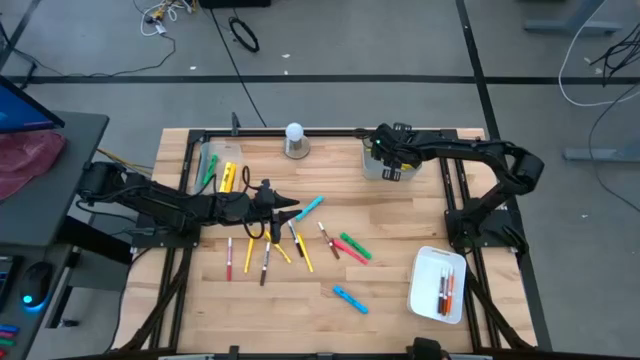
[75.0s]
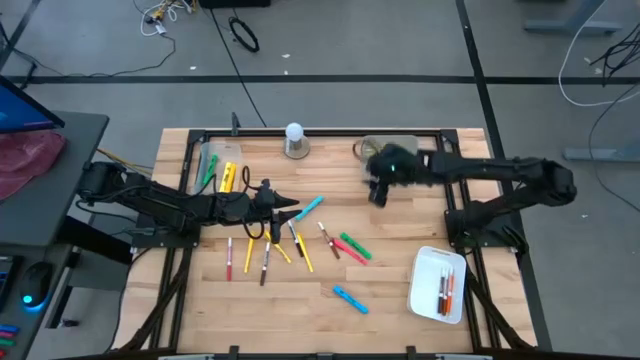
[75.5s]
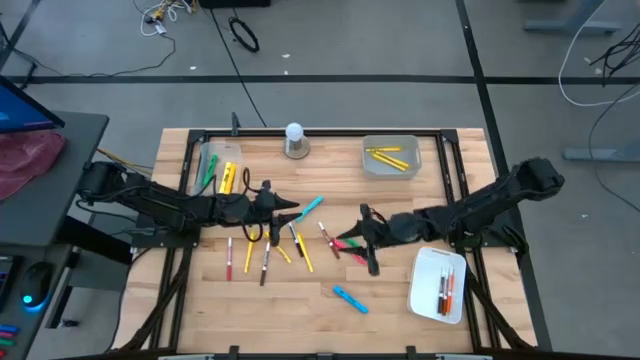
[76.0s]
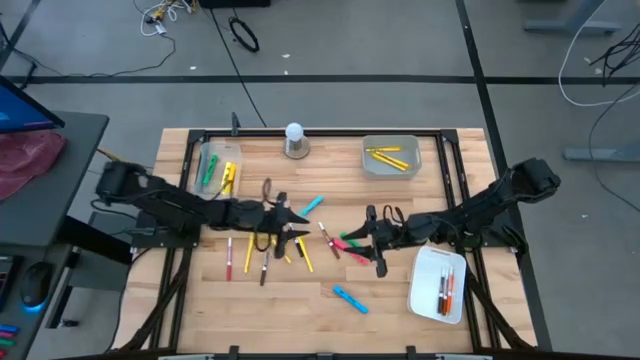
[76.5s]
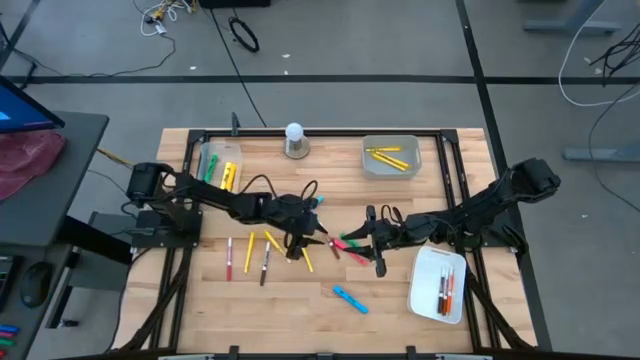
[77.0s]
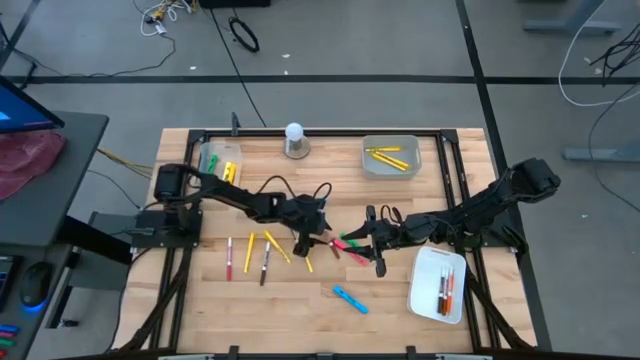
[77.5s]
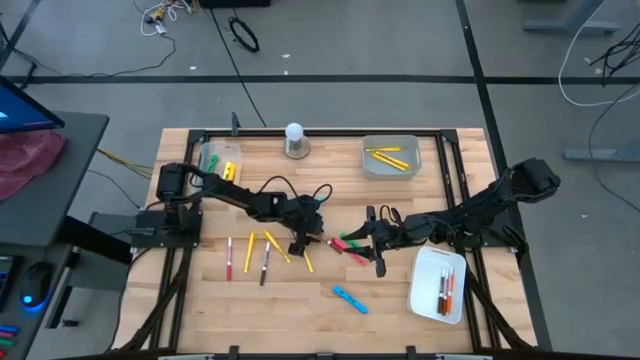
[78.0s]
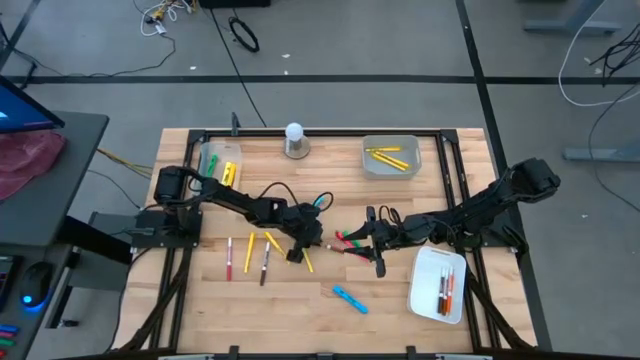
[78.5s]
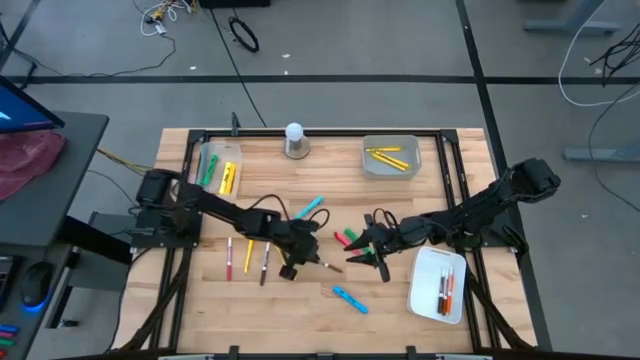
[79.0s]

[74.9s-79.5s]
Task: Pick & Place Markers
Put the brown marker into the white bin

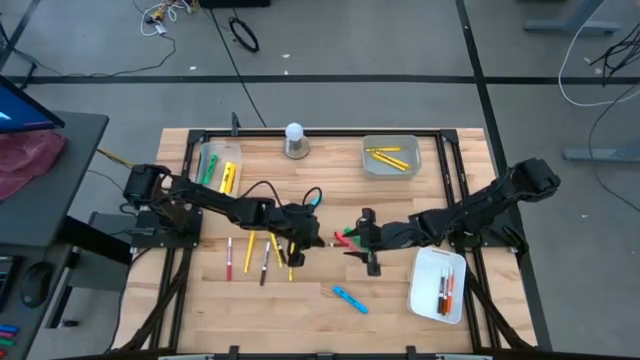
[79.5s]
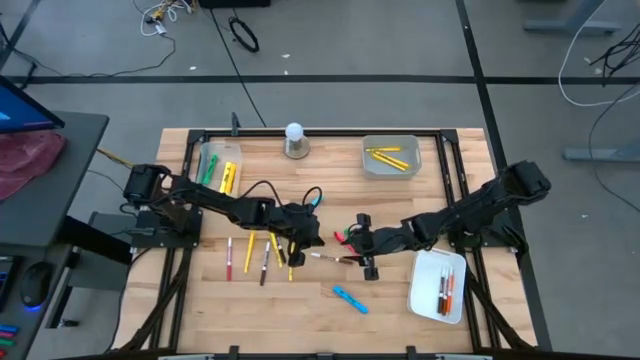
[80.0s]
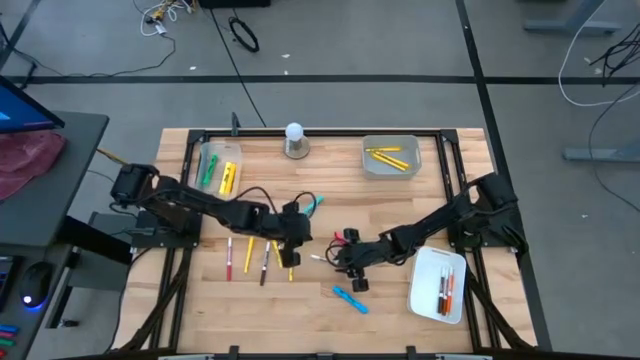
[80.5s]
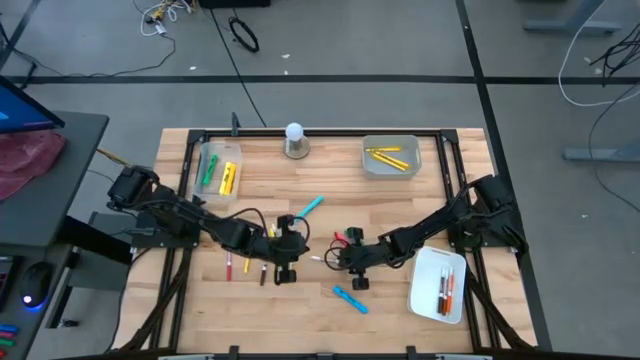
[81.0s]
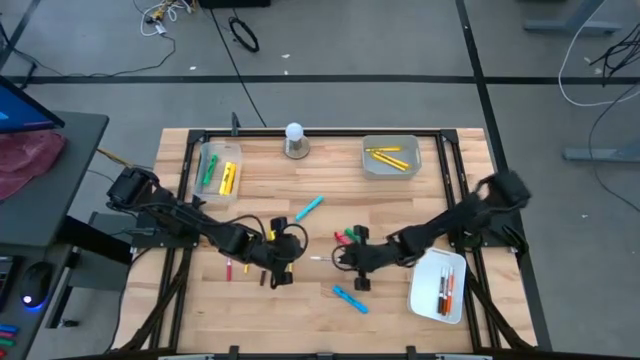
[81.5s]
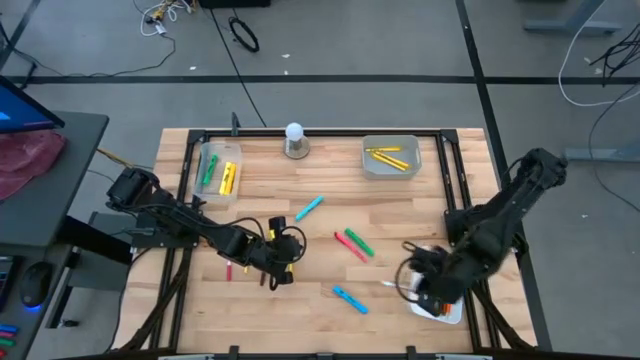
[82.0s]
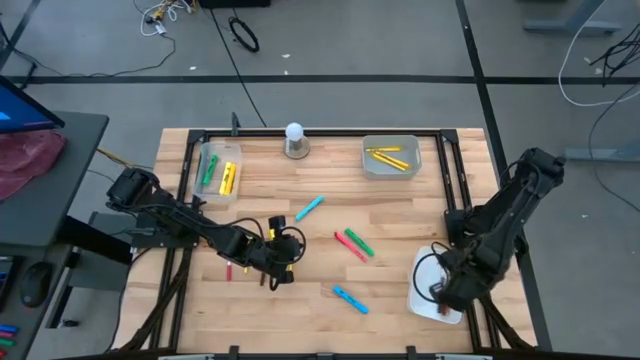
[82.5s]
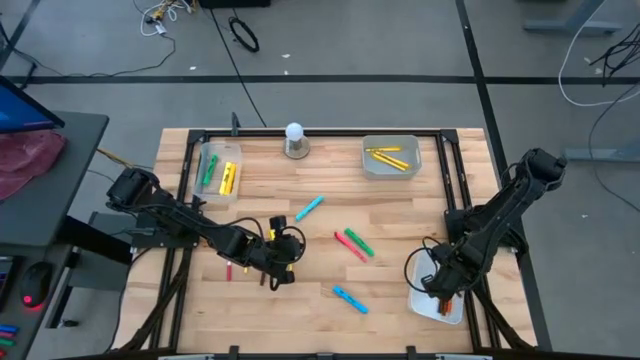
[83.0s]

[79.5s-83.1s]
Put the brown marker into the white bin

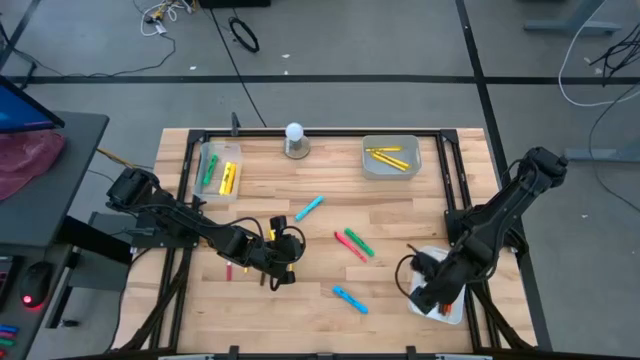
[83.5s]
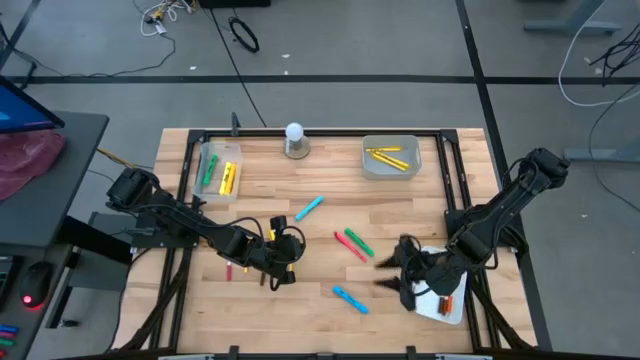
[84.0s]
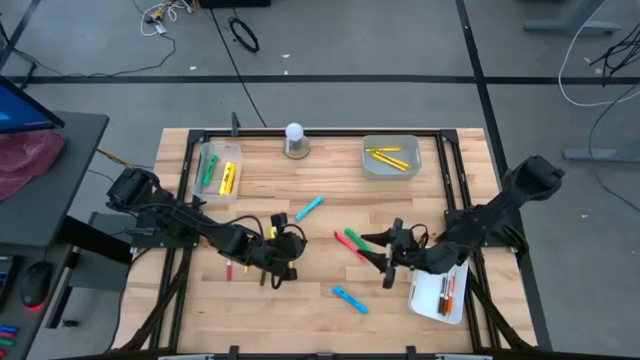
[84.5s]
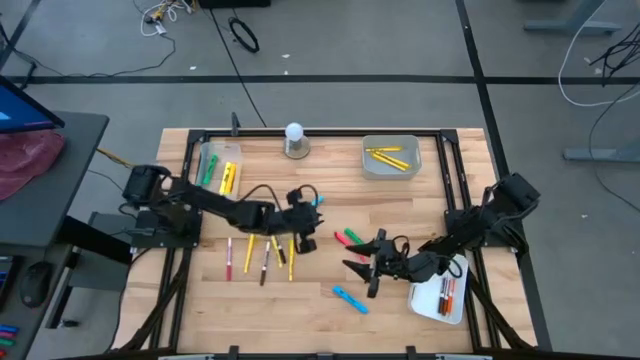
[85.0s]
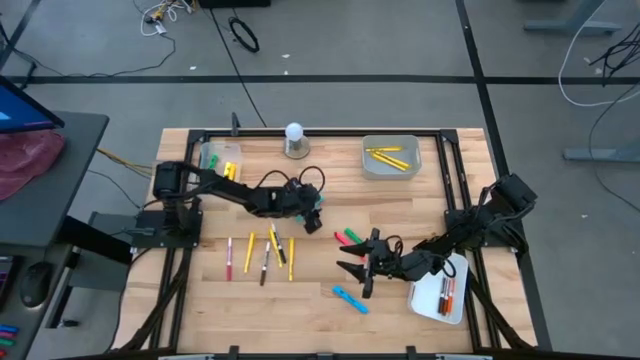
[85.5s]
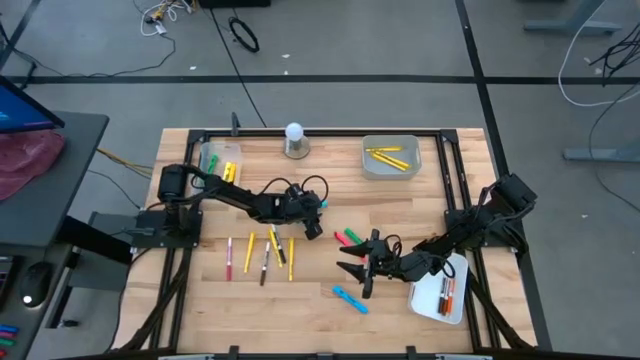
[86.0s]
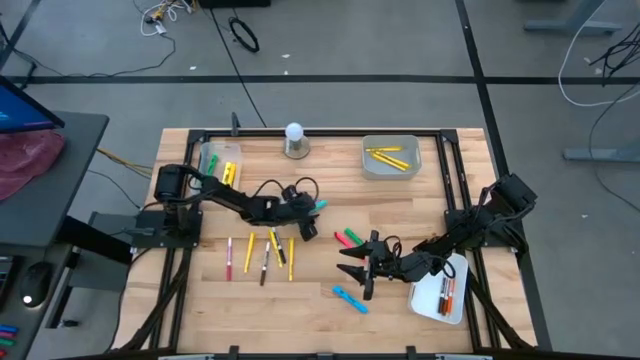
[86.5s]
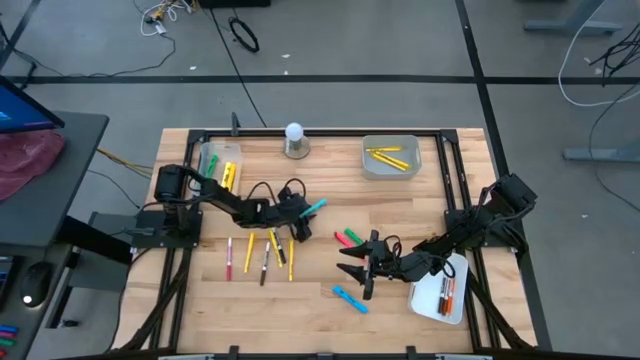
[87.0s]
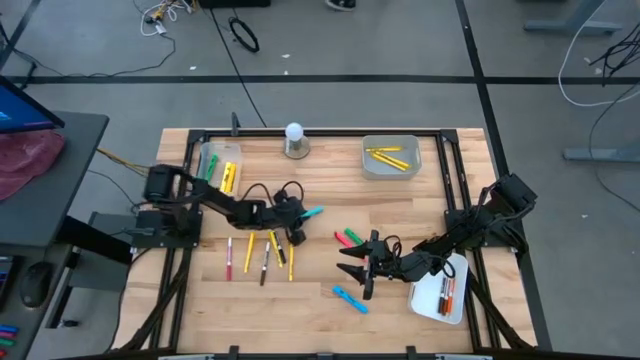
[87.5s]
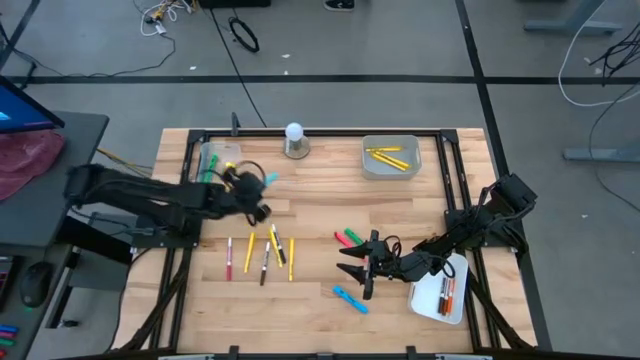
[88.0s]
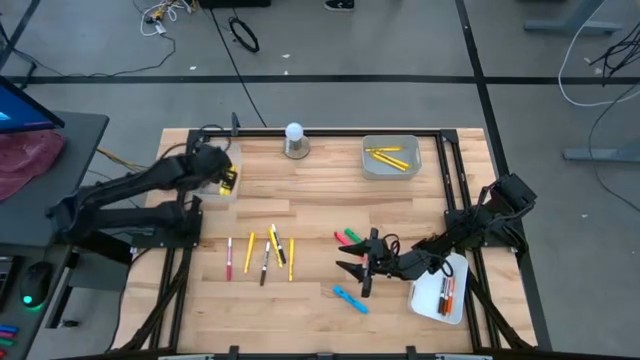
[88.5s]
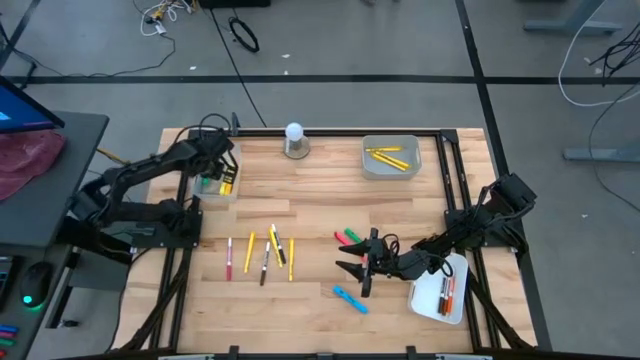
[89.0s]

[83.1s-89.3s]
Put the blue highlighter into the transparent bin

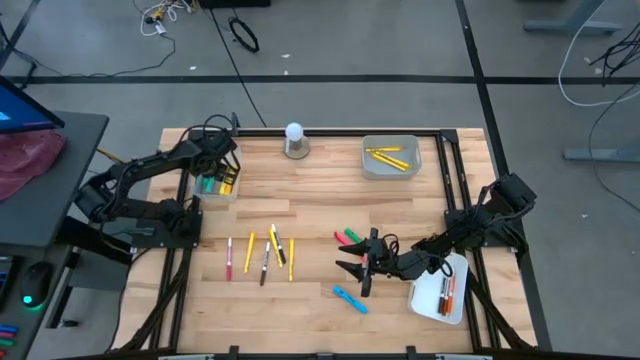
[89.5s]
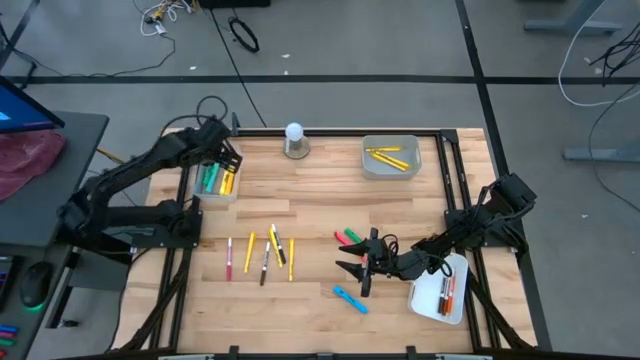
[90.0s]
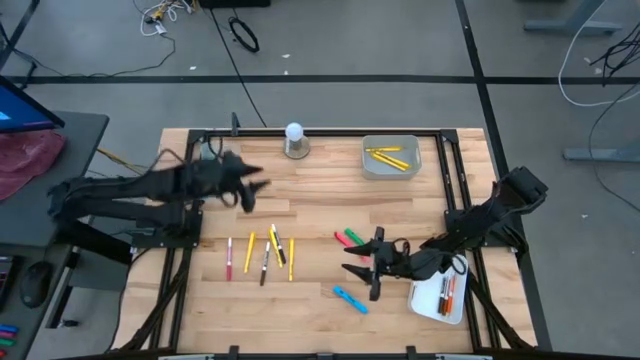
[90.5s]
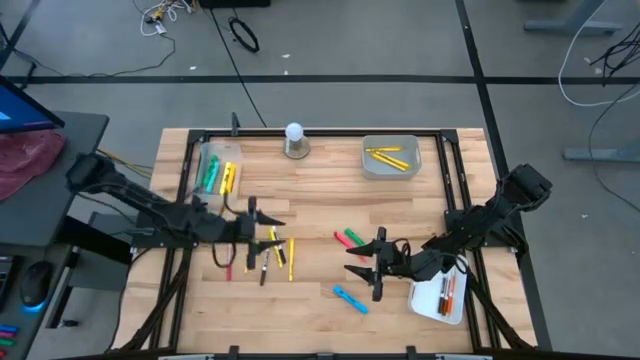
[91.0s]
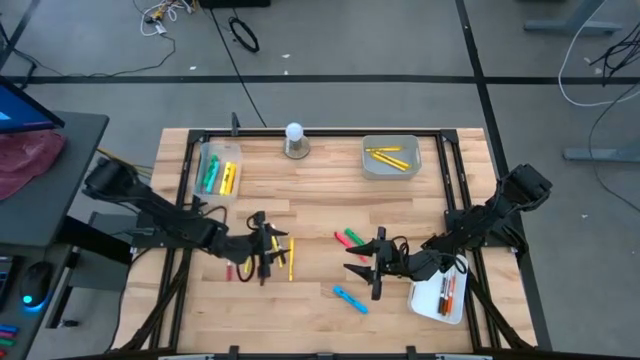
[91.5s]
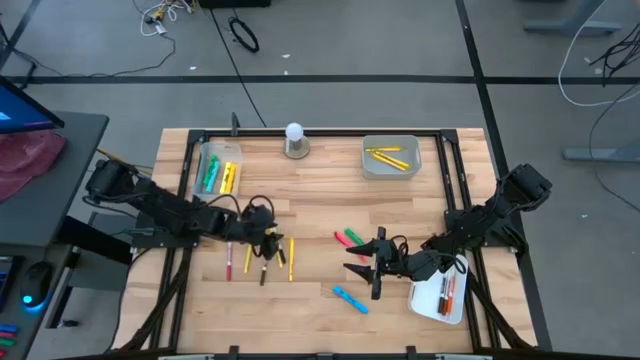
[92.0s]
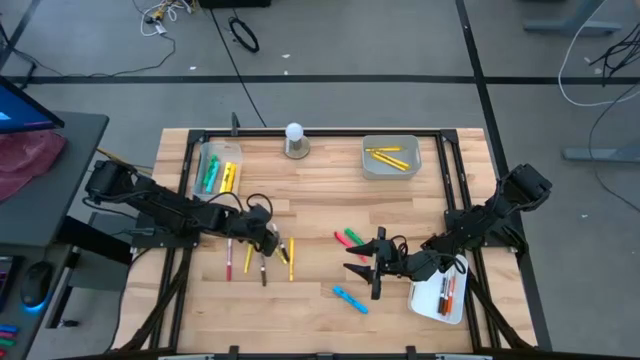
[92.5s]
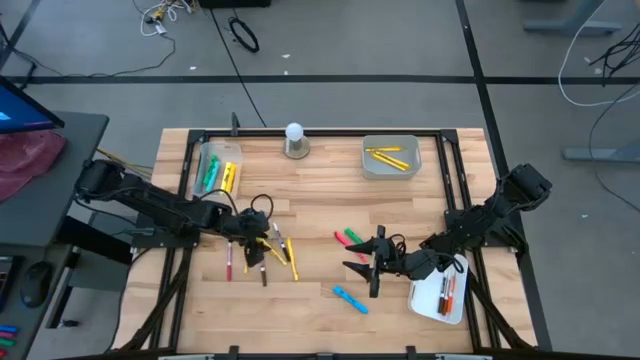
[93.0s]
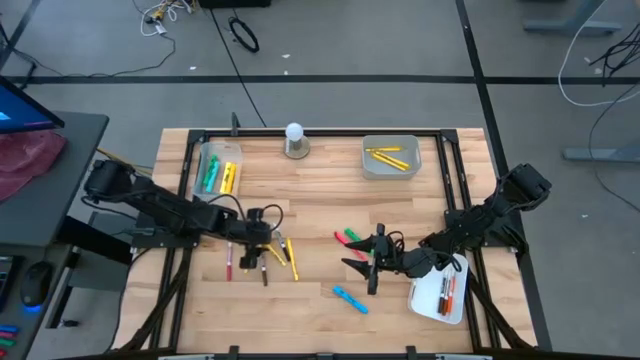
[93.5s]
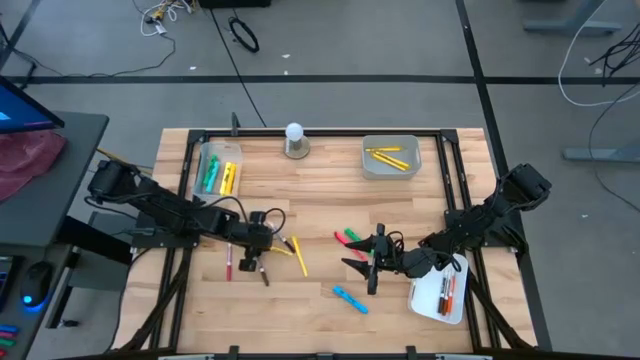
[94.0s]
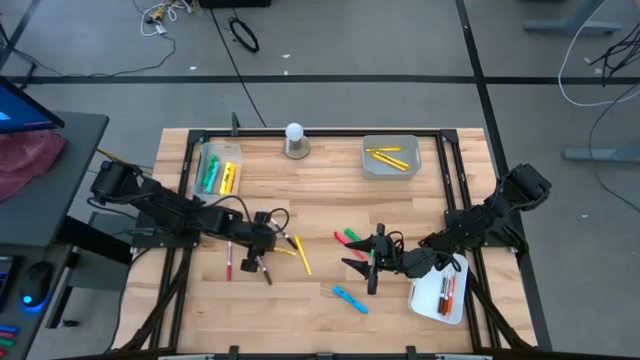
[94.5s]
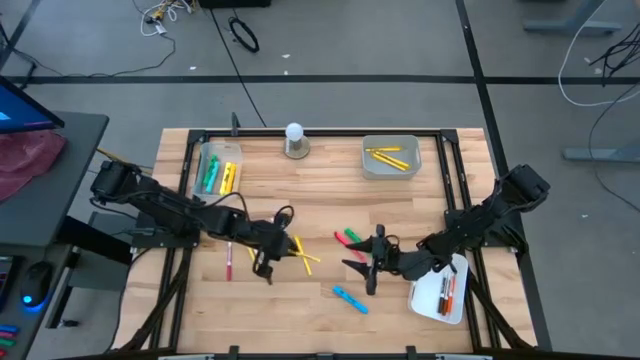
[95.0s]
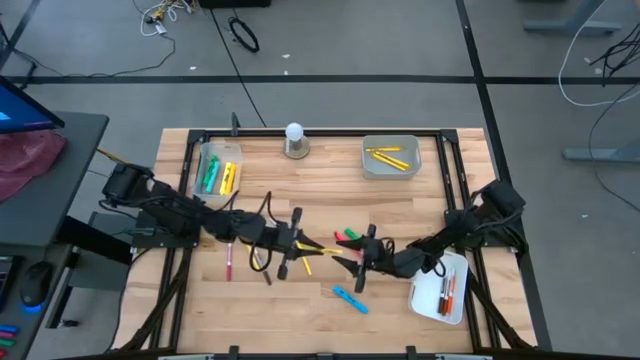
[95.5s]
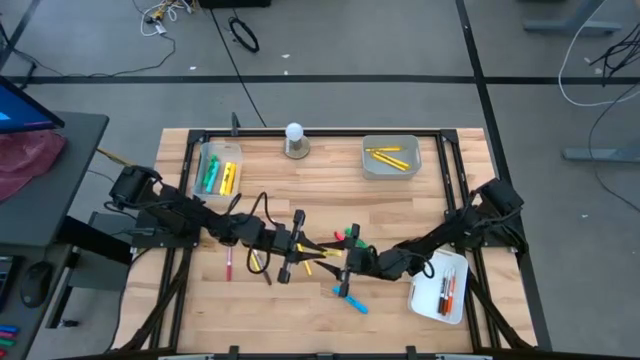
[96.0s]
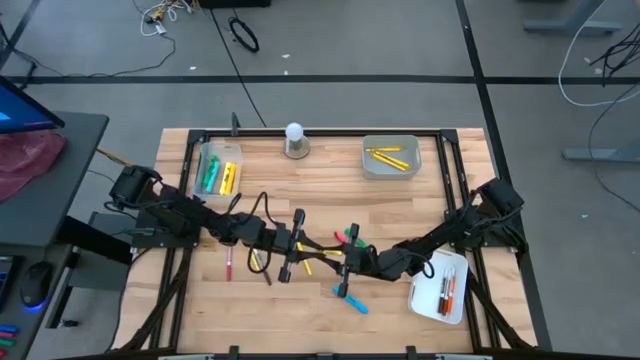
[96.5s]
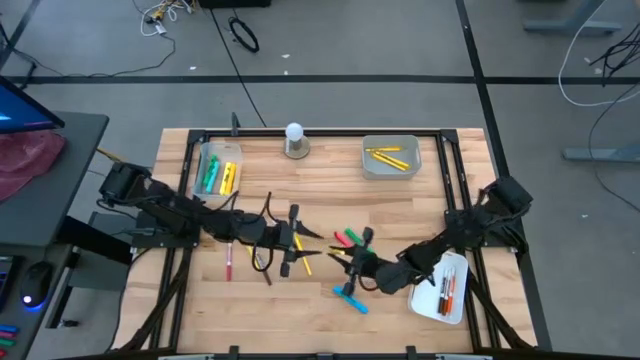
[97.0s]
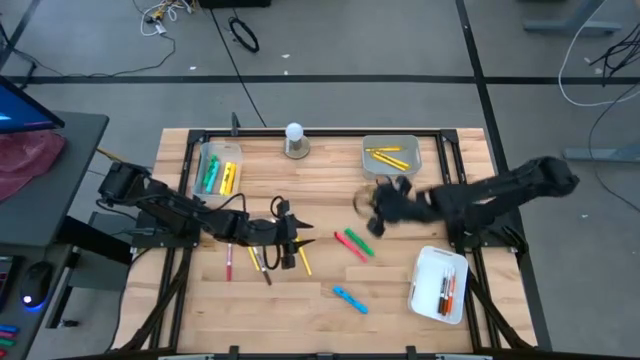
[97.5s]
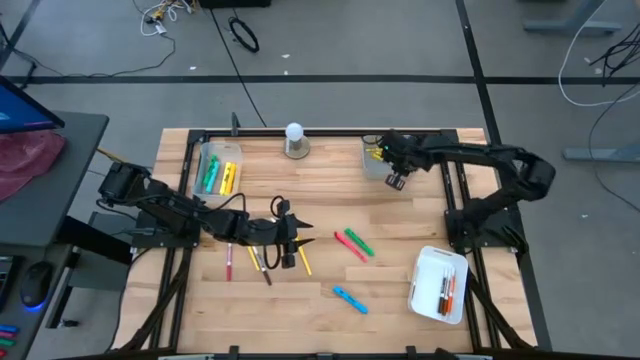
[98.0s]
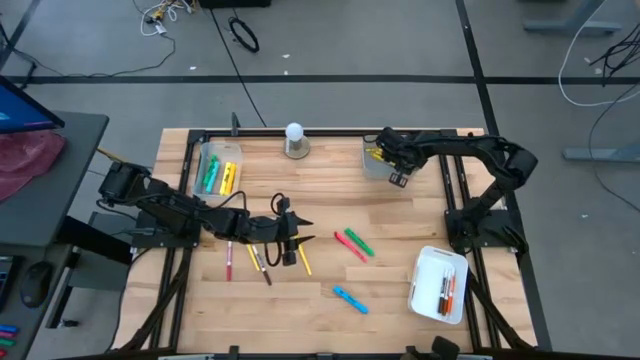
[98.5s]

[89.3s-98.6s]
Put the yellow pen into the gray bin
